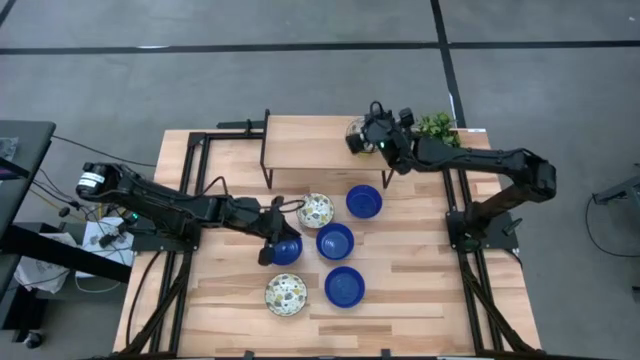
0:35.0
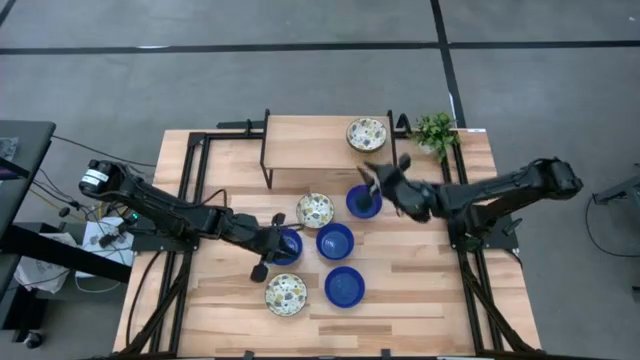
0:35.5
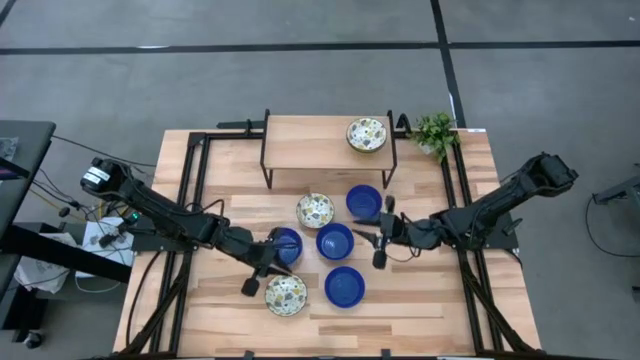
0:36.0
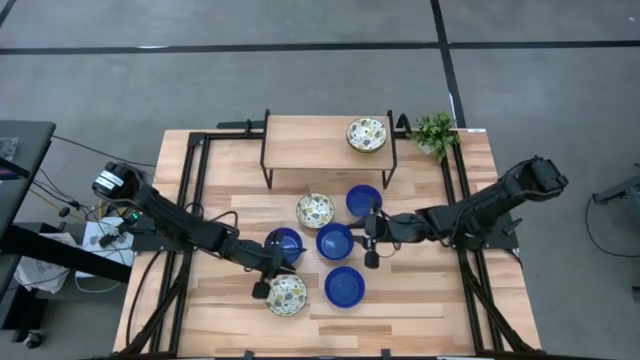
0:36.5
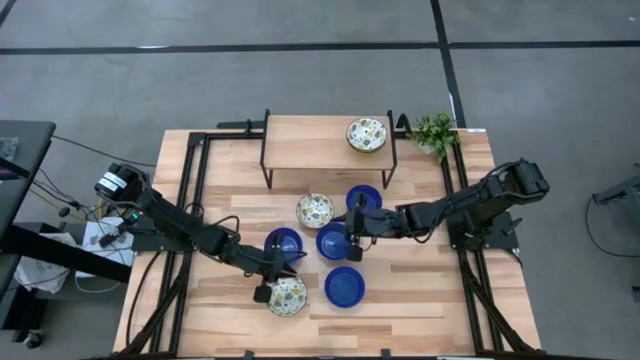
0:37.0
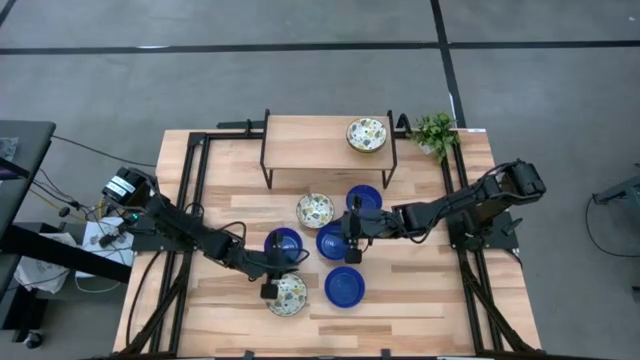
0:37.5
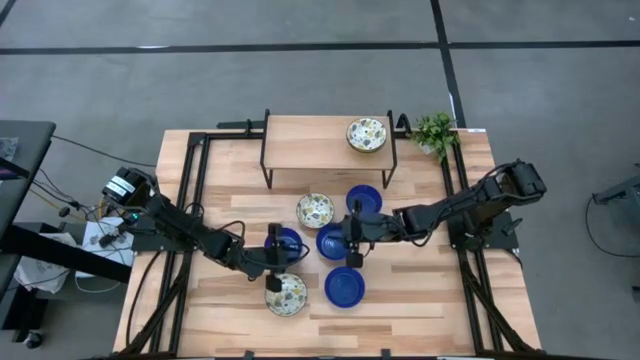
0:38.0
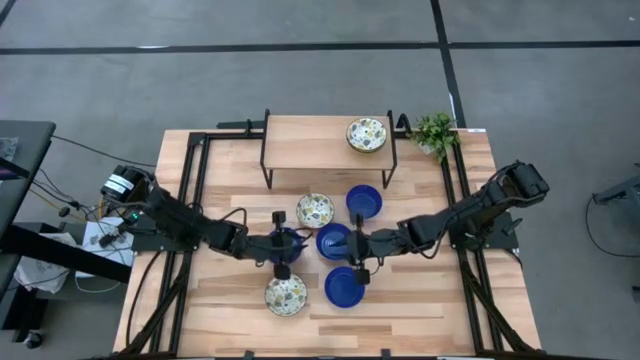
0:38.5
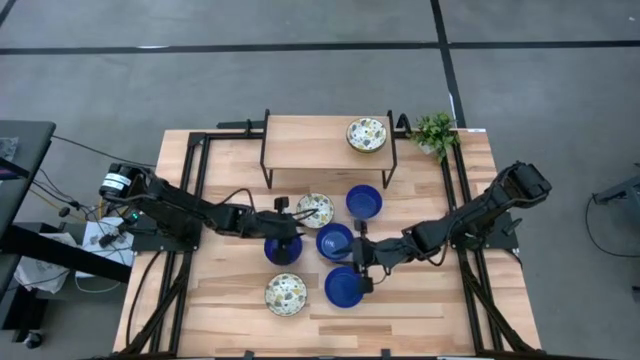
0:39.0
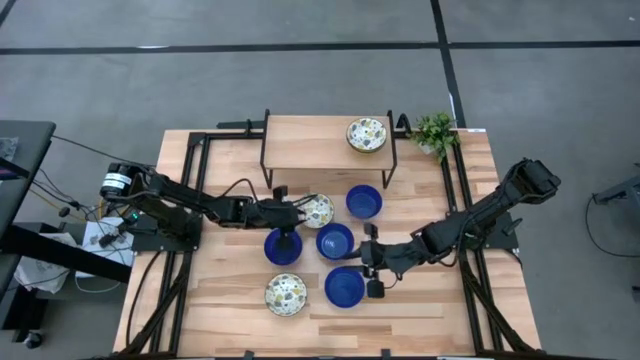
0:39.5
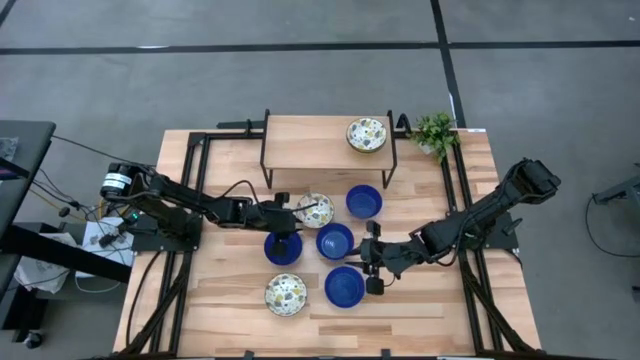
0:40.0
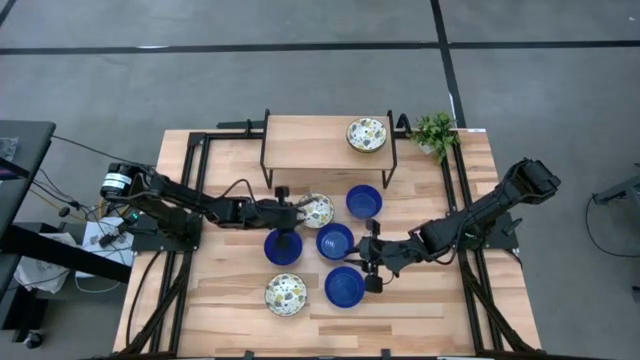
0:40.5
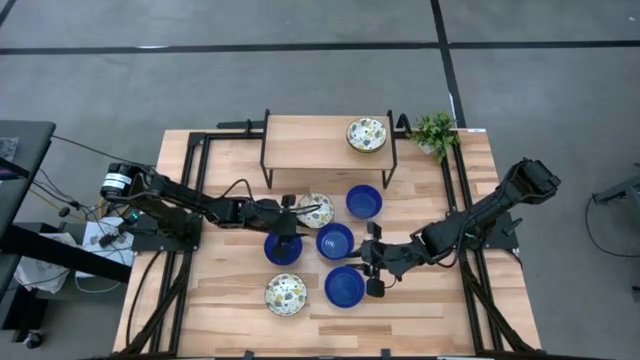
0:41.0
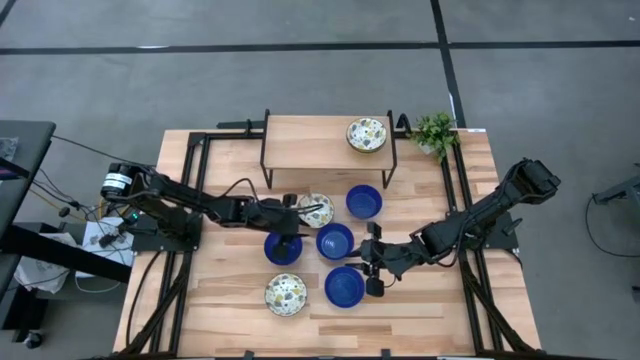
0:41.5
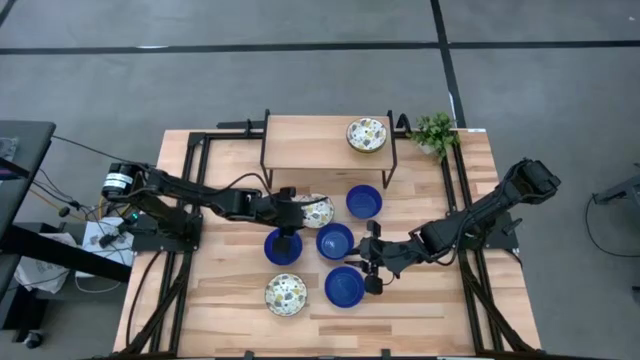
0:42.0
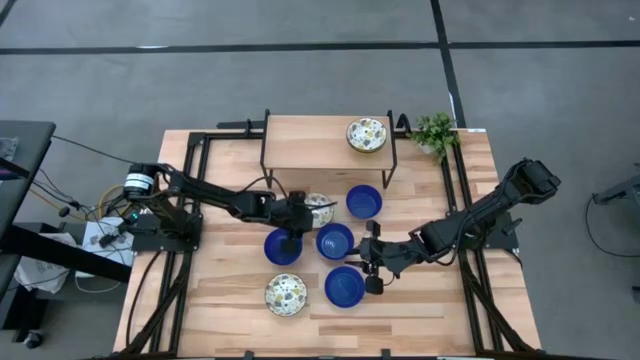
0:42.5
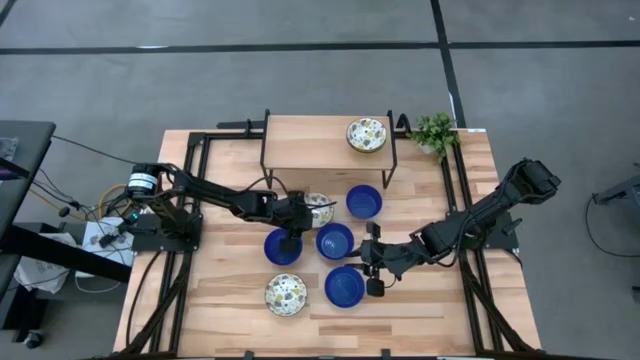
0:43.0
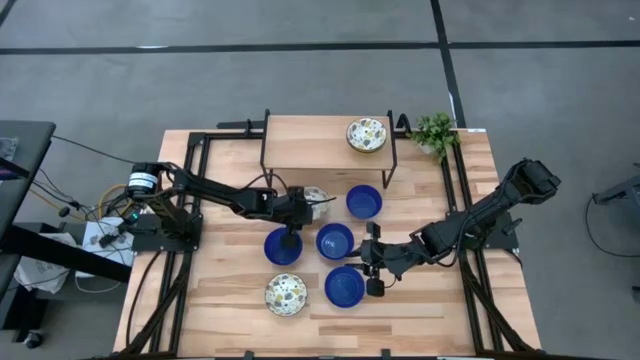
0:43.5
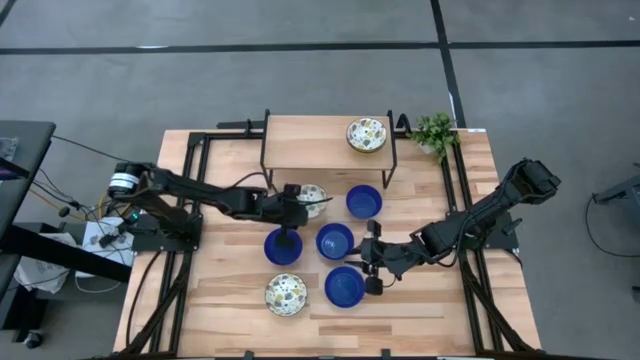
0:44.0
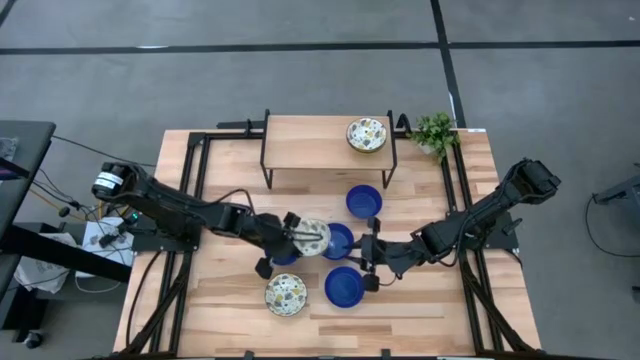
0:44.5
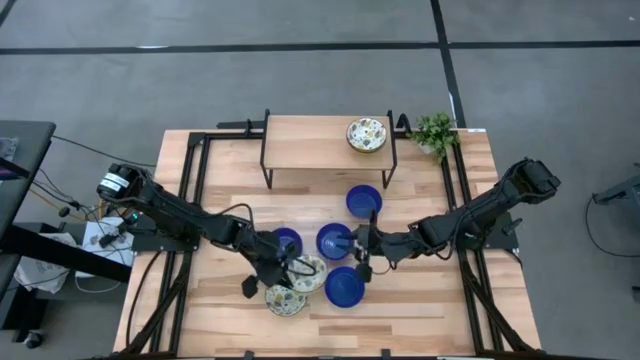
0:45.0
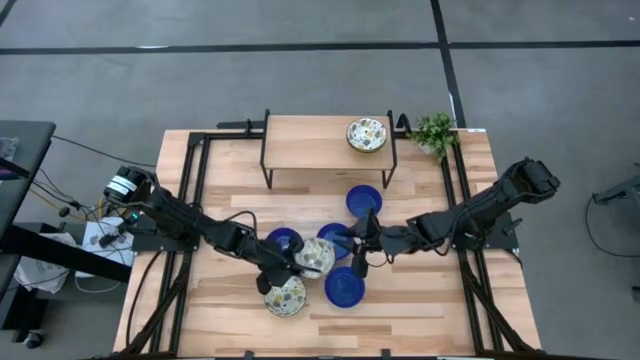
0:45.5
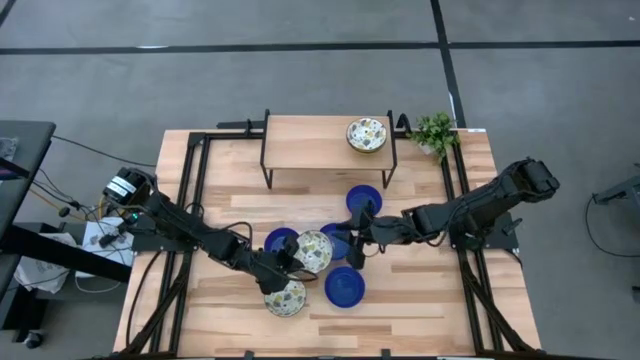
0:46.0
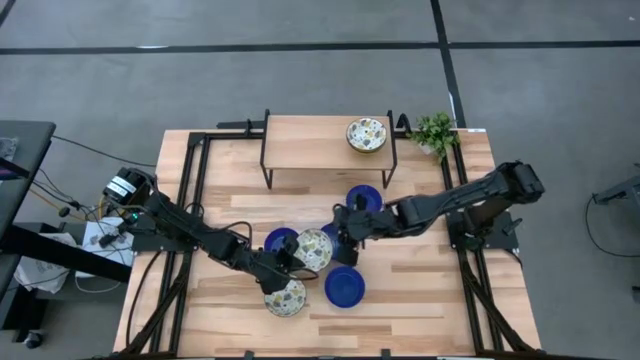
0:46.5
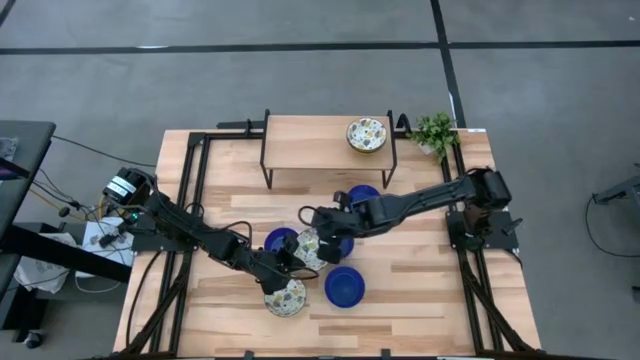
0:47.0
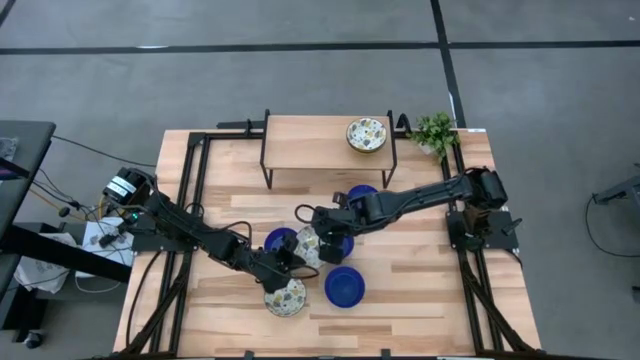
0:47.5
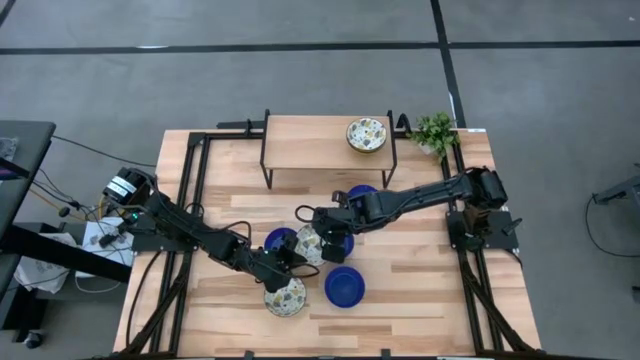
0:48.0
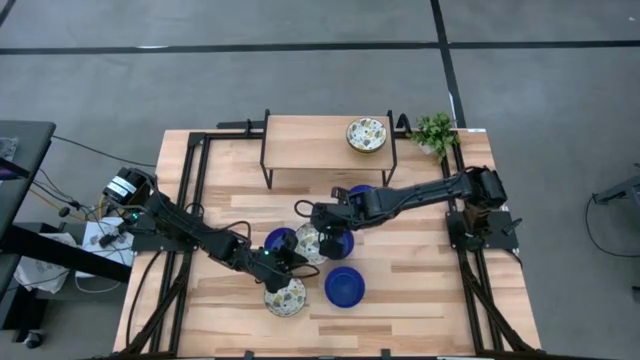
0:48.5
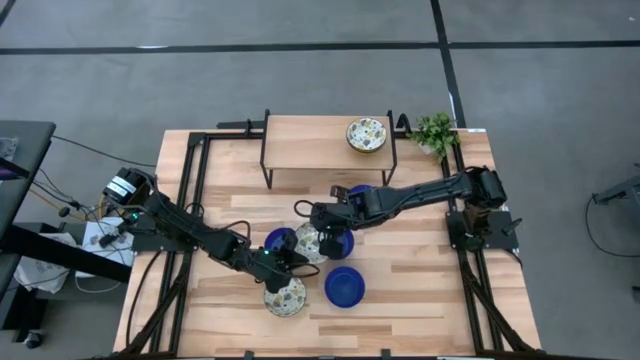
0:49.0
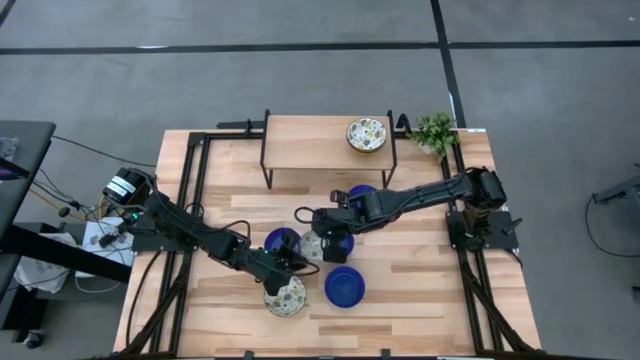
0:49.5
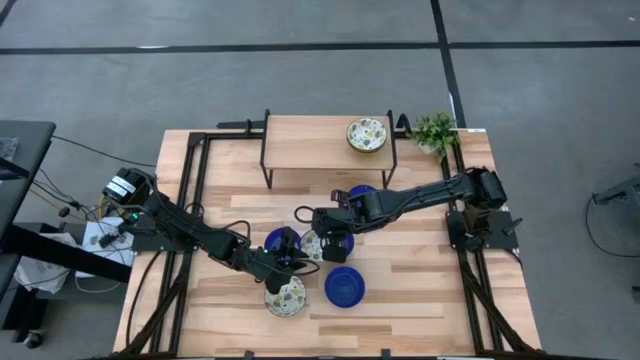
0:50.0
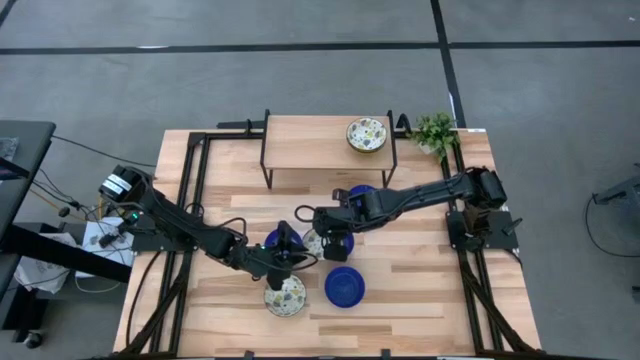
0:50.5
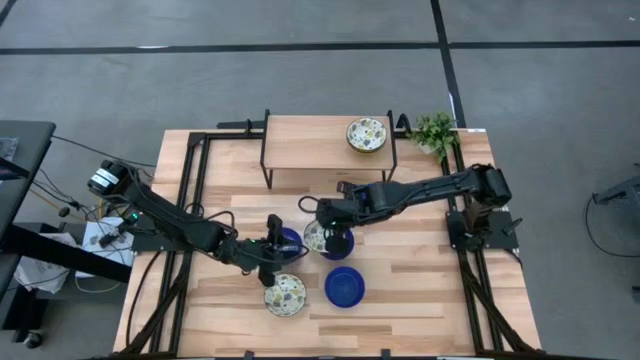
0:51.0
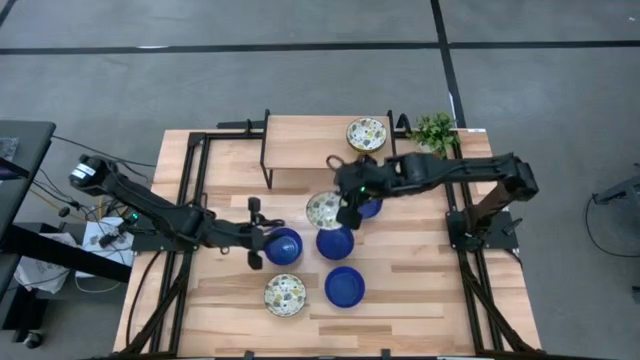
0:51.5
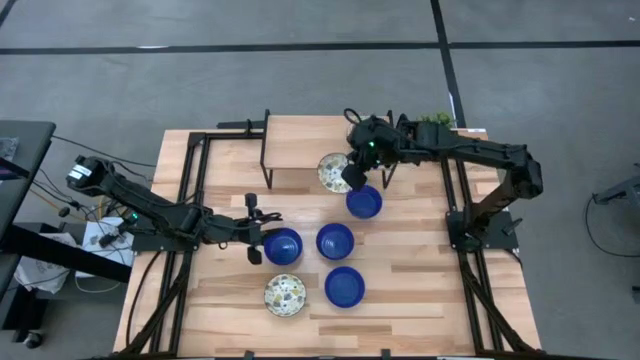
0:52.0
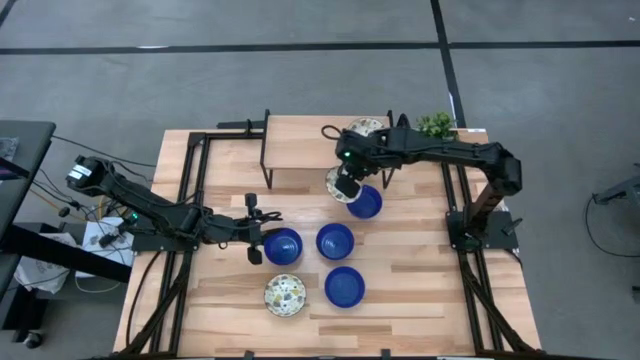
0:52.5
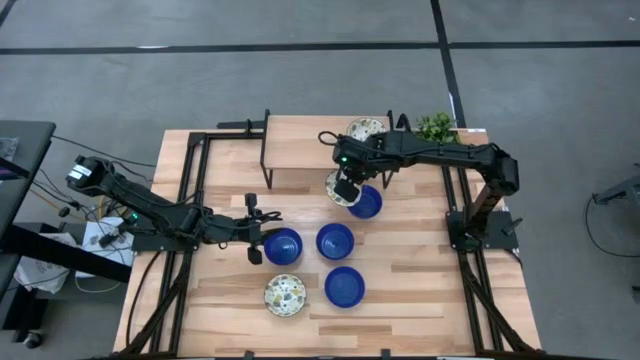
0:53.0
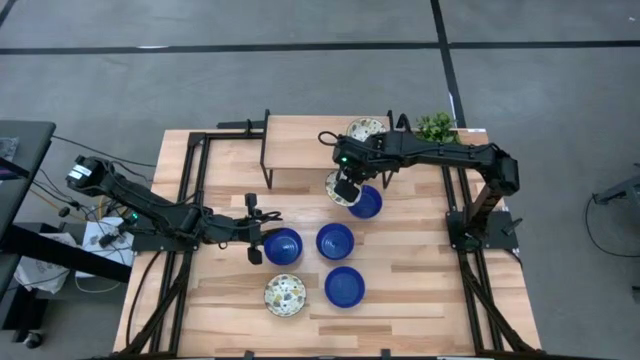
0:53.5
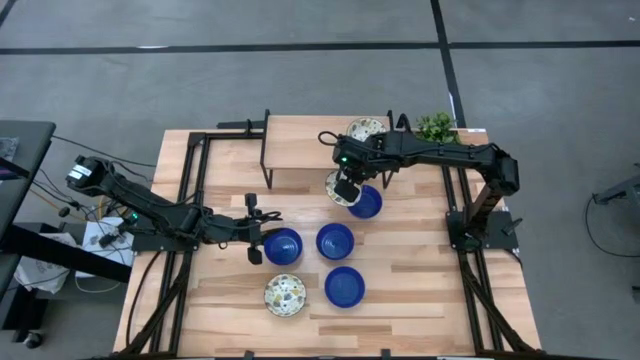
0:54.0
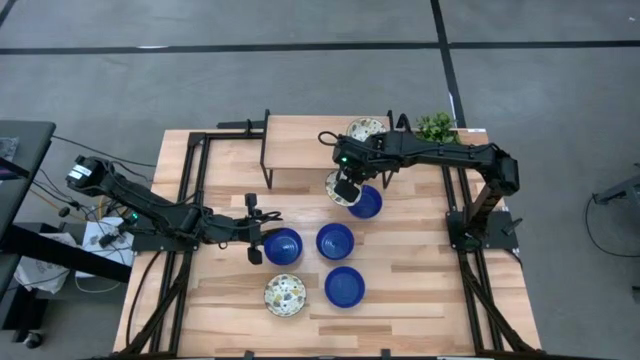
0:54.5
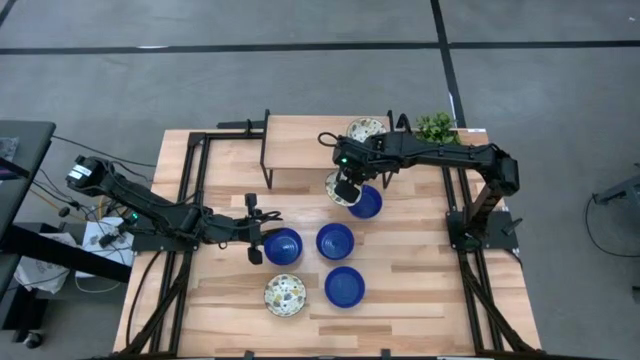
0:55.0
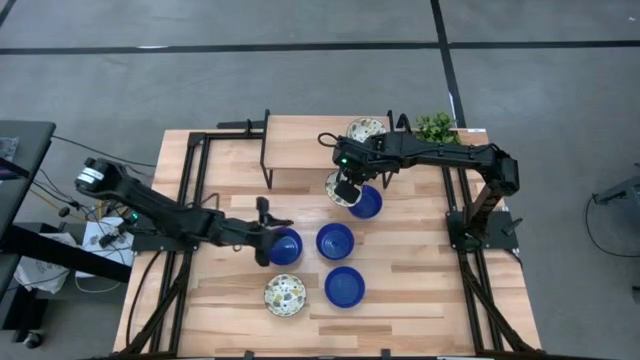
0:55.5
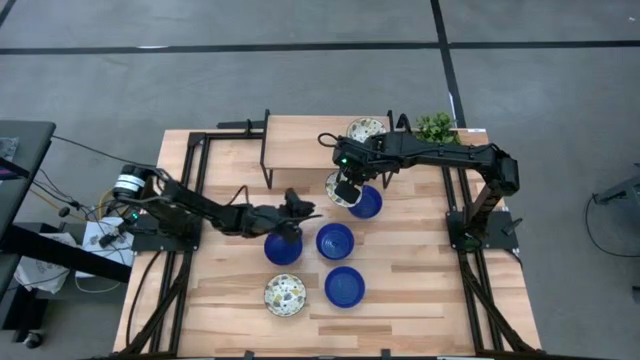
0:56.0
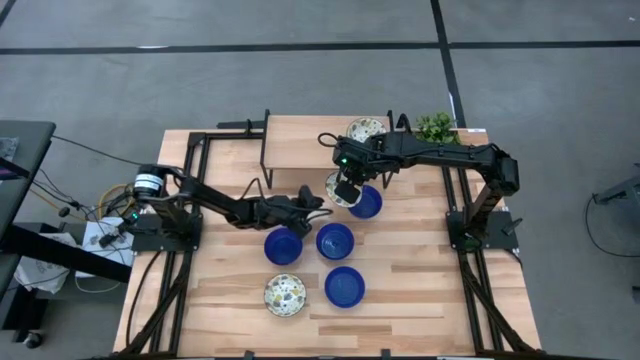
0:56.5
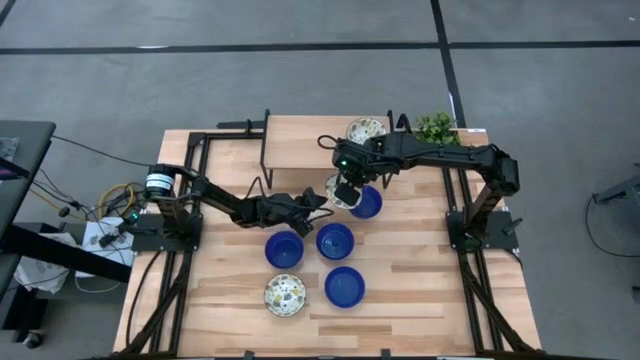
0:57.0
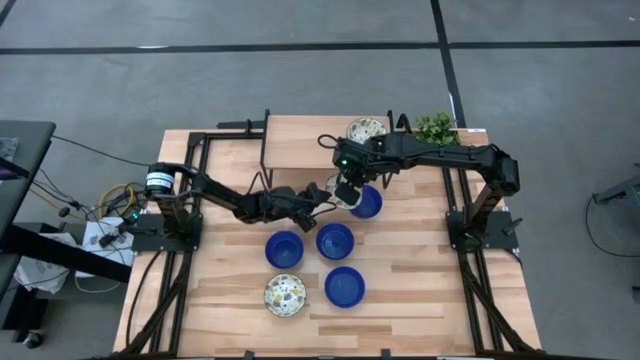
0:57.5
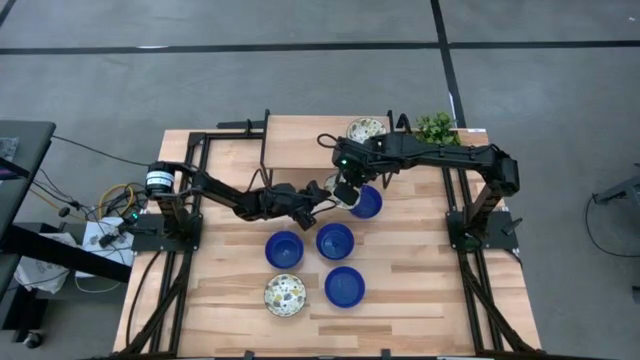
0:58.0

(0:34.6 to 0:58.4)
Task: Pick & Place Mini bowls
Stack the yellow patterned bowl on top of the yellow patterned bowl on the shelf
